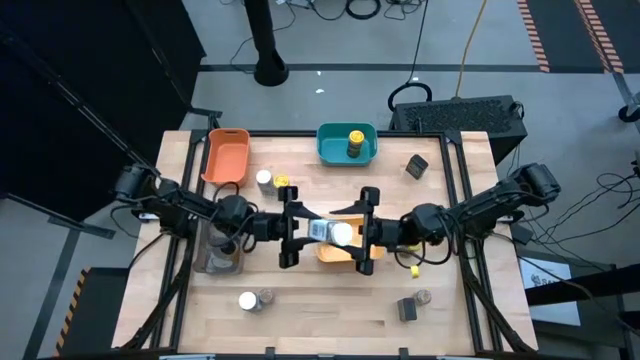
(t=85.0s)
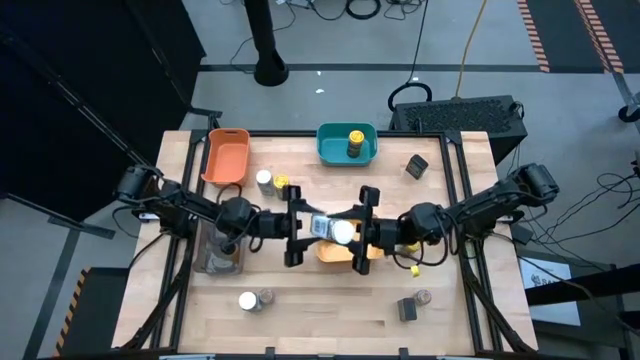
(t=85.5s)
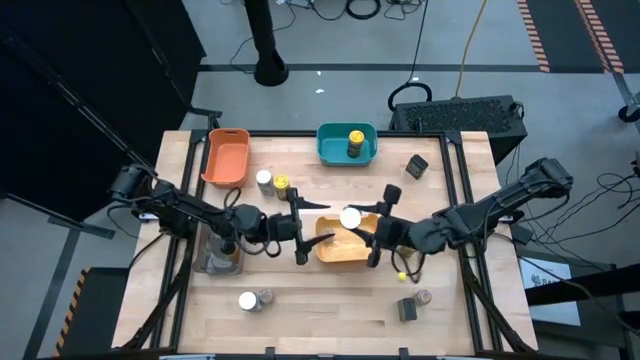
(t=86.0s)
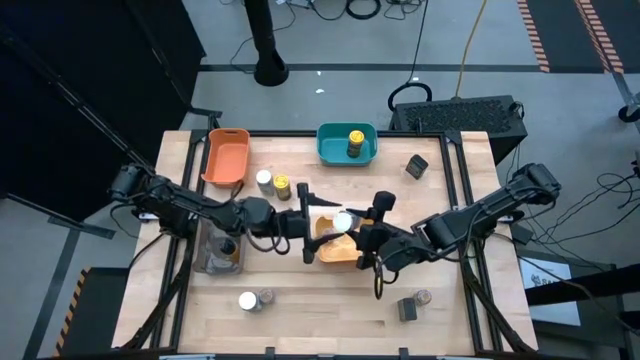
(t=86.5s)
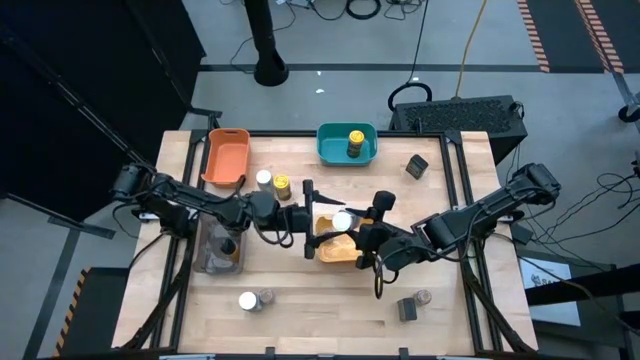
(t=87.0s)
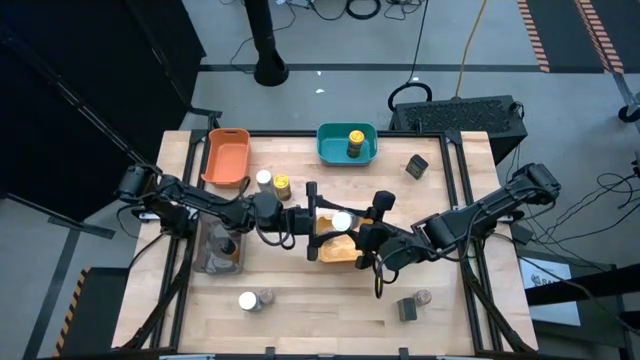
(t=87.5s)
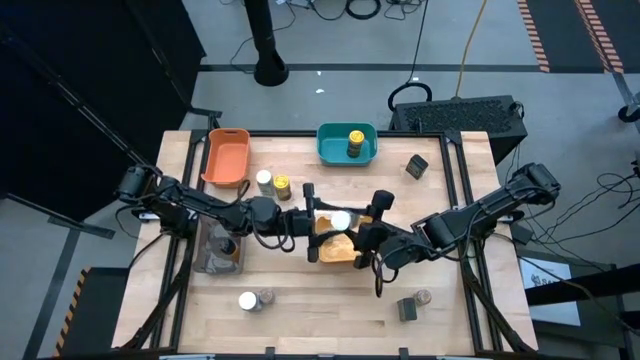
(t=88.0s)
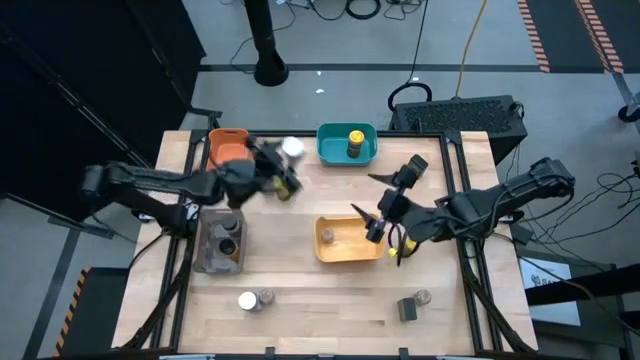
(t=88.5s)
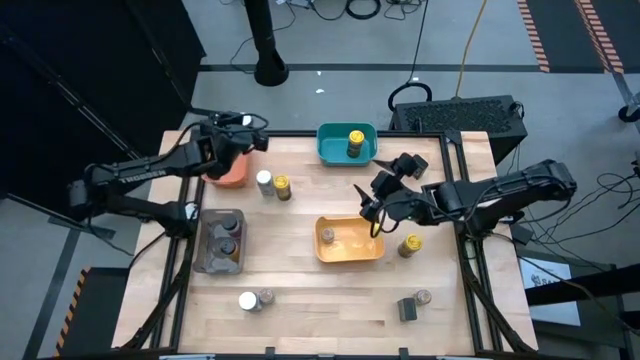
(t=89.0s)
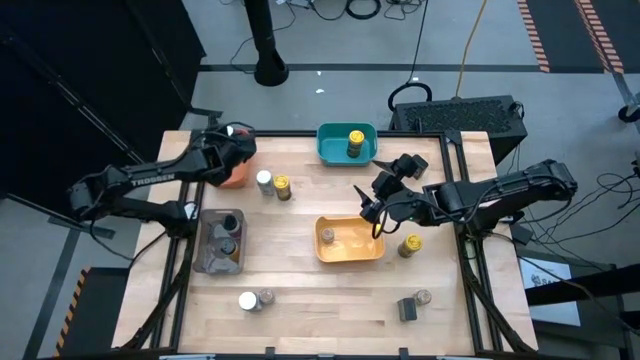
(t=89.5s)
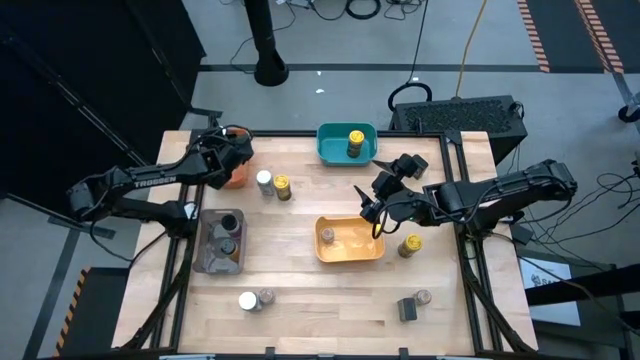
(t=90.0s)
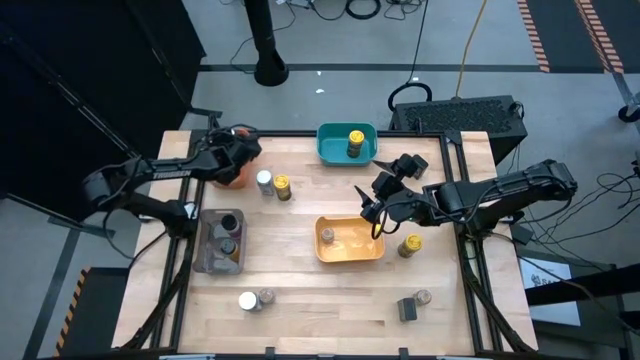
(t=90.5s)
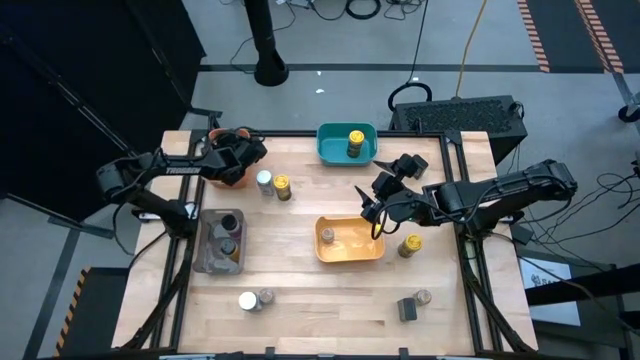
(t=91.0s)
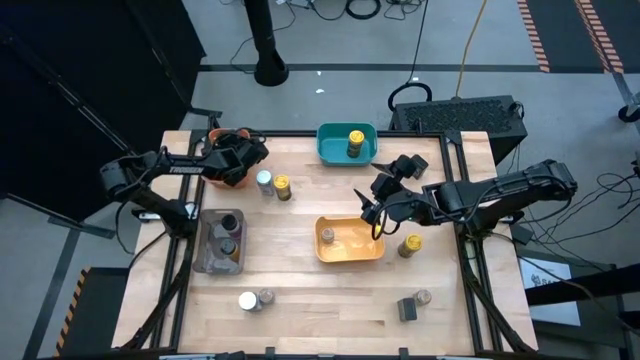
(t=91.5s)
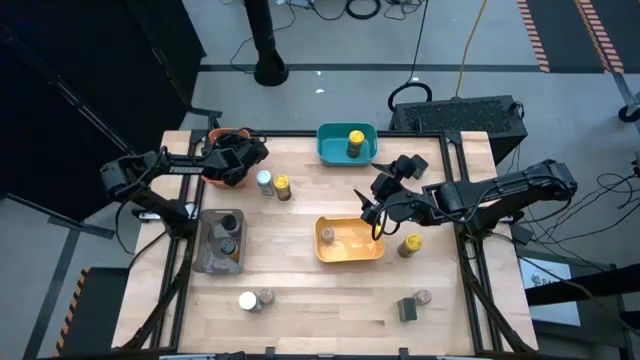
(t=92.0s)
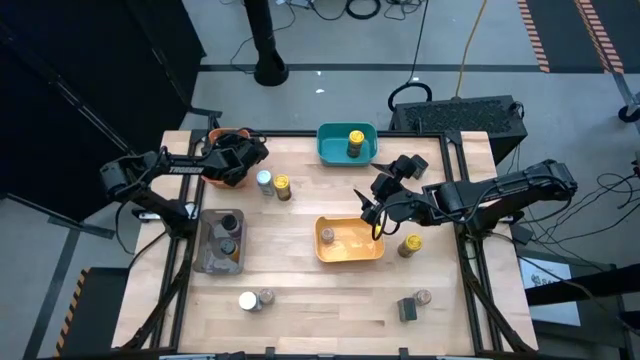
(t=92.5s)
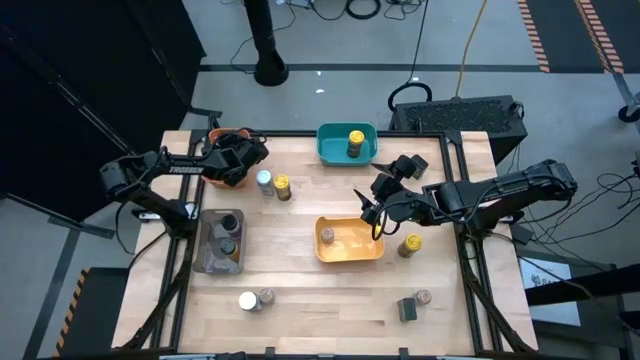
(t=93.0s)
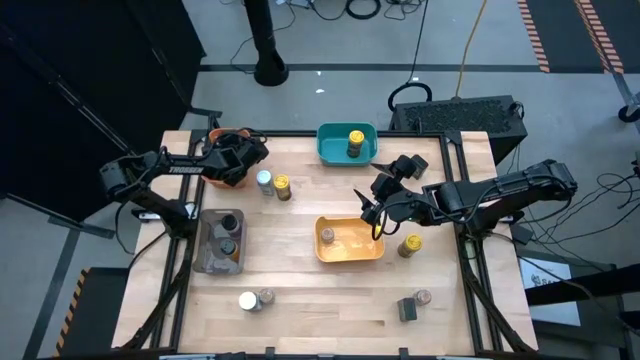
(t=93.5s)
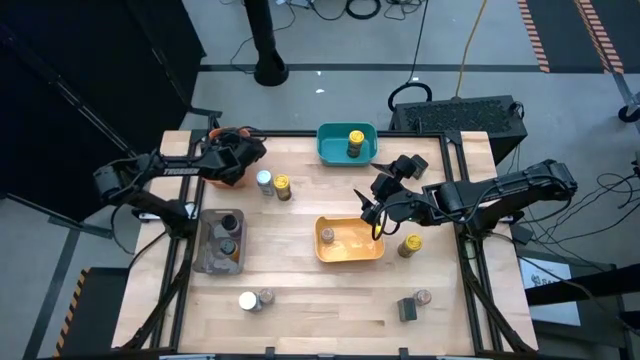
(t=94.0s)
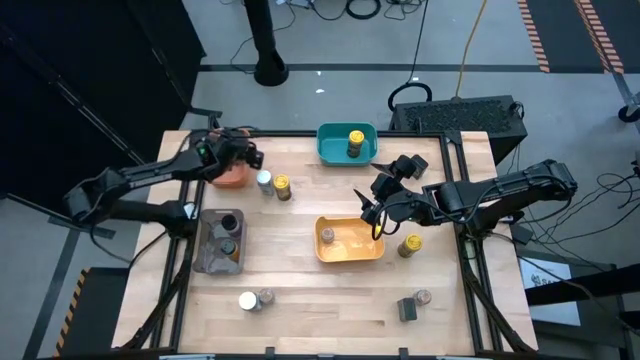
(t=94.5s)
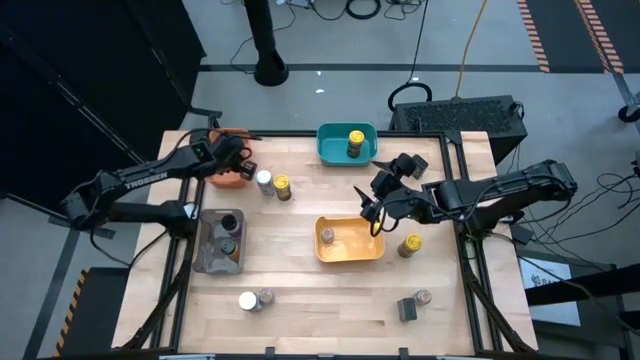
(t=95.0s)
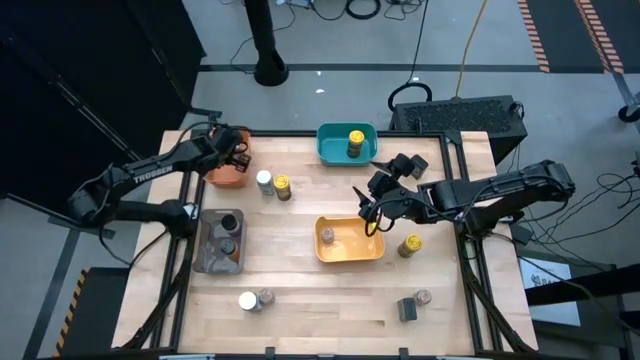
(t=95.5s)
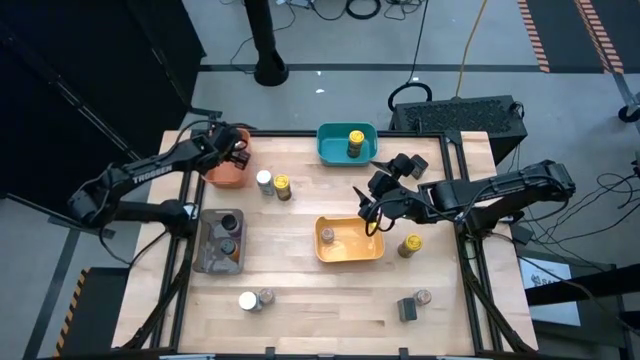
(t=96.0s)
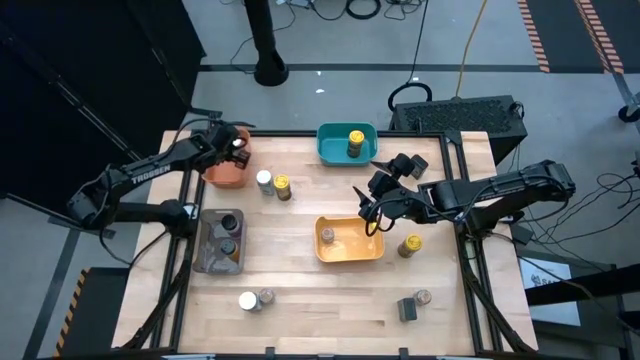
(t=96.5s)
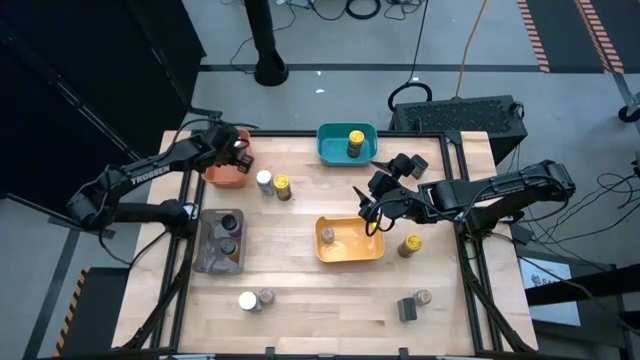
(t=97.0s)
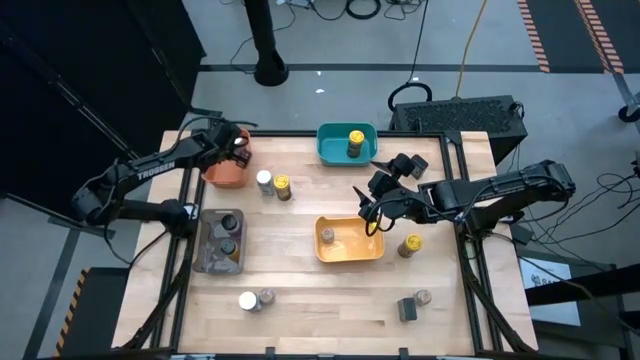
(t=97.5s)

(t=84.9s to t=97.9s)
Task: Sort spices by type
Put the bottom right white spice bottle into the orange bin

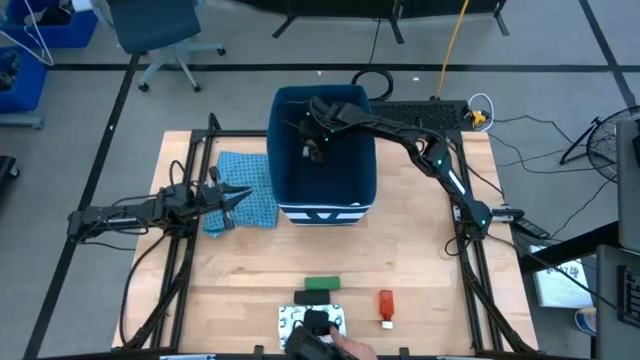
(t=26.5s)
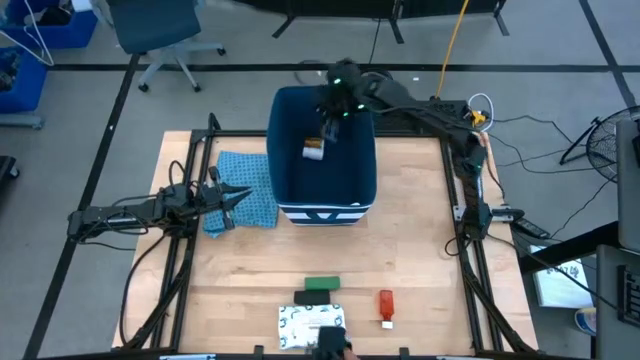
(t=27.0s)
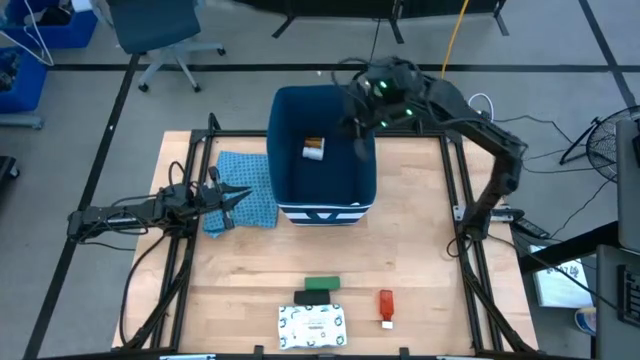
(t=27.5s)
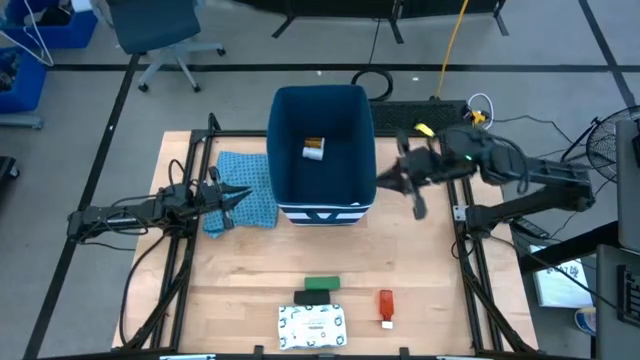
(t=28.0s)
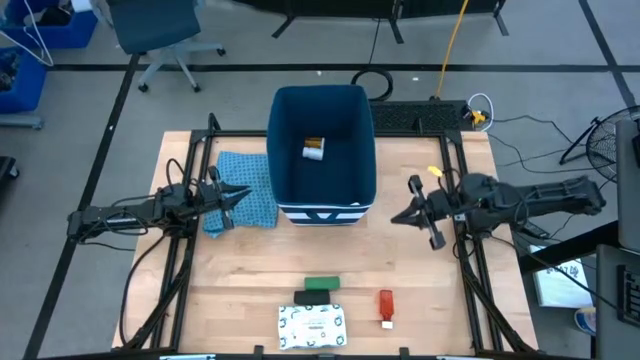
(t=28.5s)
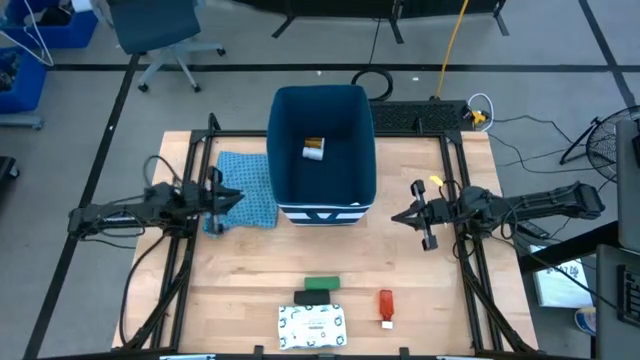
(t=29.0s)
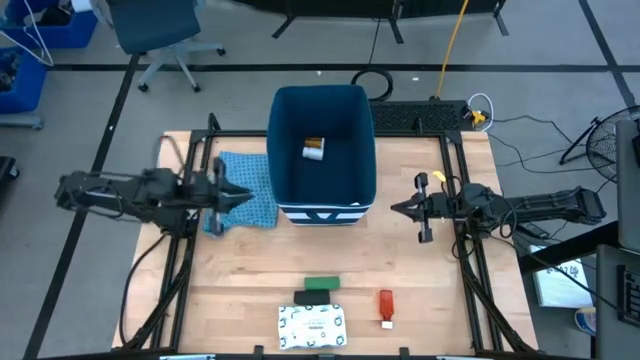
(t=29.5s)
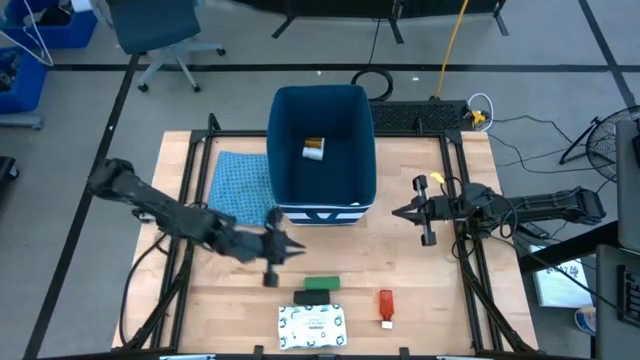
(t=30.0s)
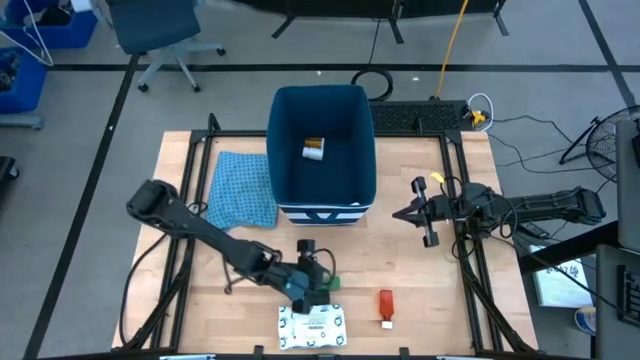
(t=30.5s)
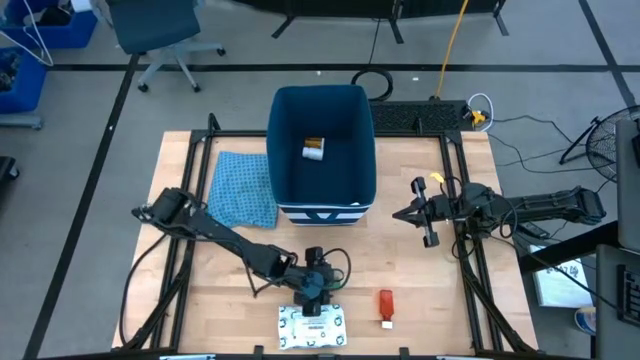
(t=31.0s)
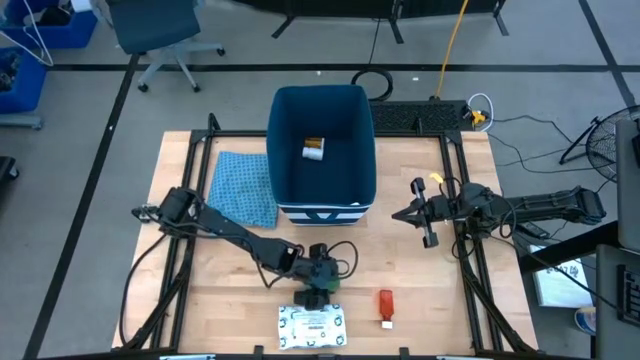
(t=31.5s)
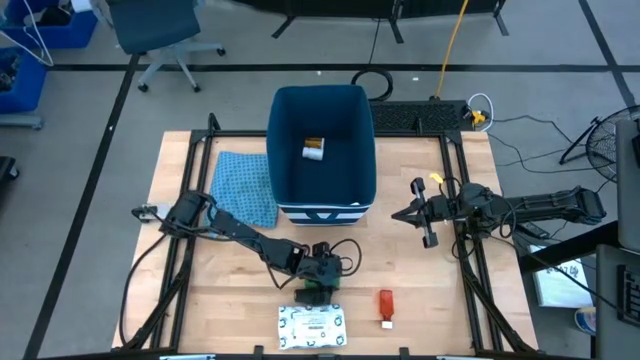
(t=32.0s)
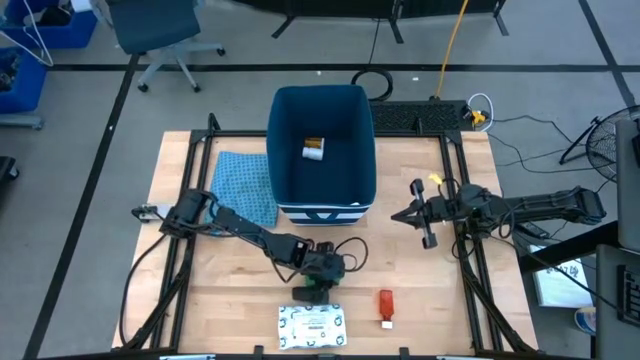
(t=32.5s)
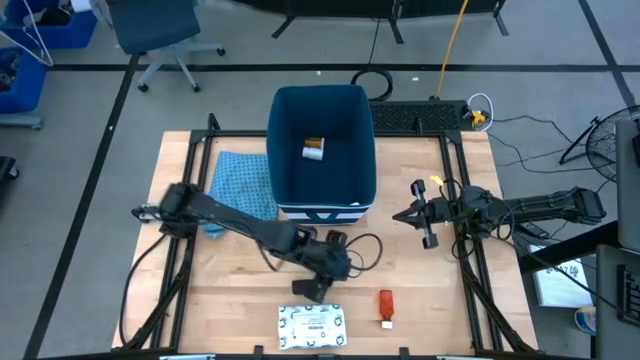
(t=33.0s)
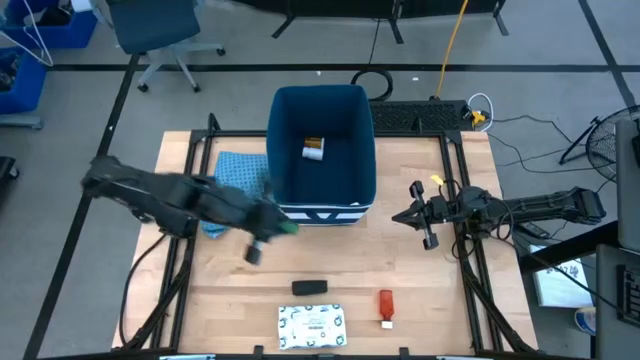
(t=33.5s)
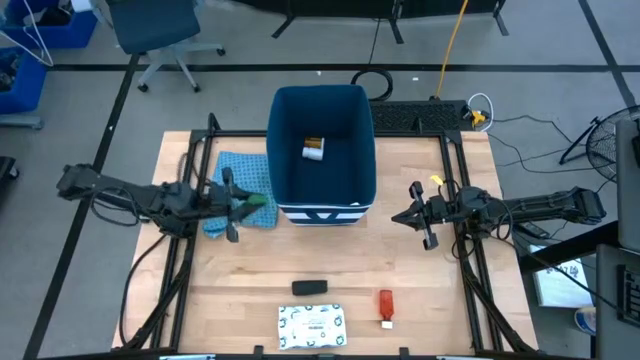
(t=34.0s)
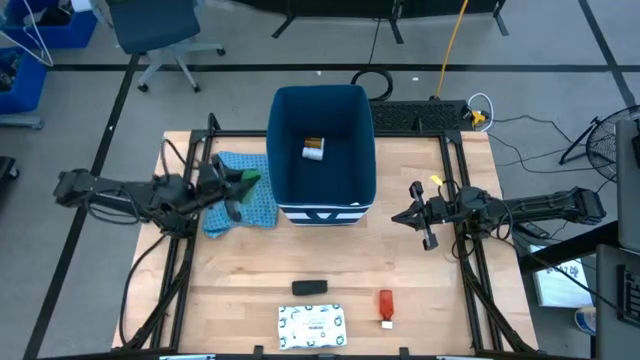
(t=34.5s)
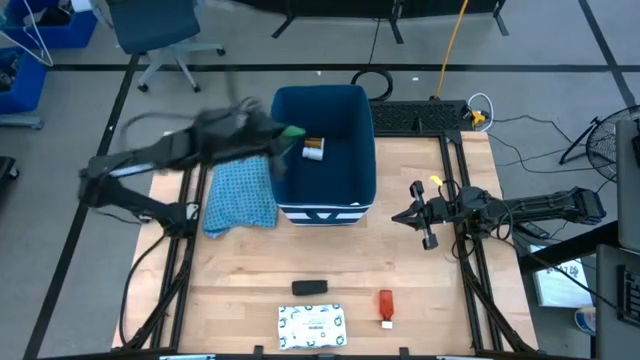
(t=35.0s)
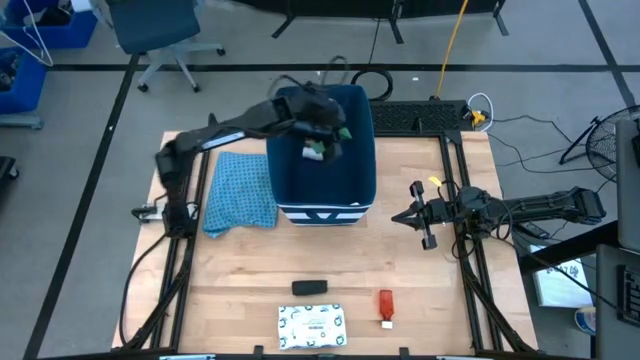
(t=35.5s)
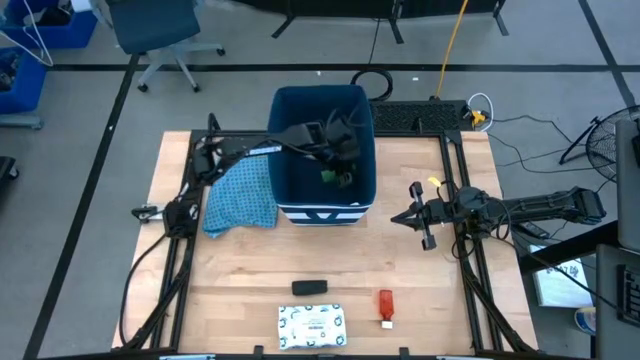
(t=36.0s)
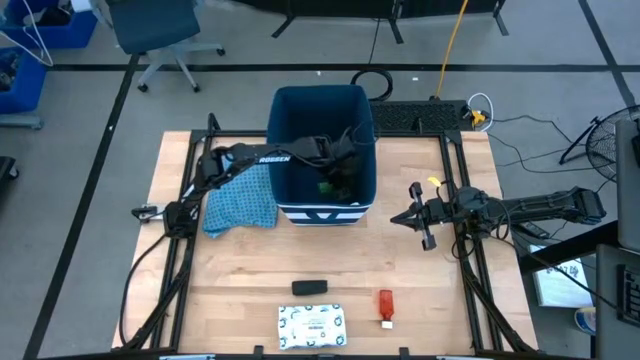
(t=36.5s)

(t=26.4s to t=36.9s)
Task: Pick & place medical supplies in basket/bin
Put the green bandage into the blue bin
